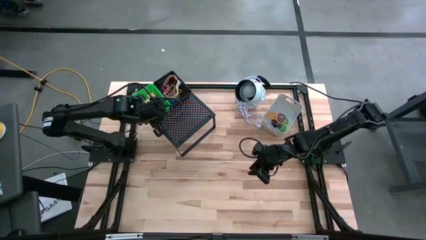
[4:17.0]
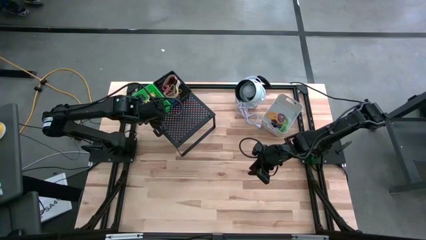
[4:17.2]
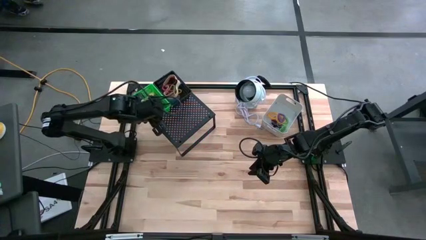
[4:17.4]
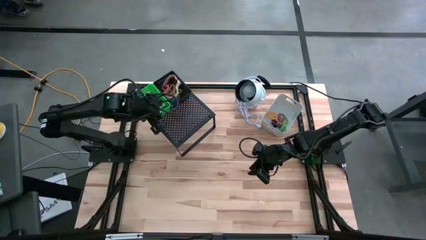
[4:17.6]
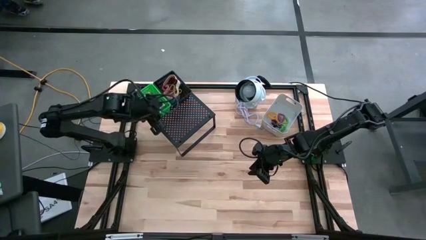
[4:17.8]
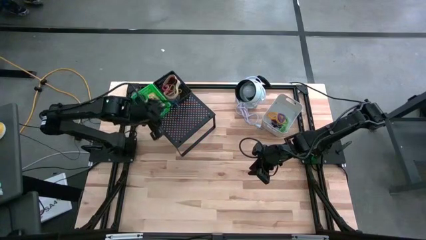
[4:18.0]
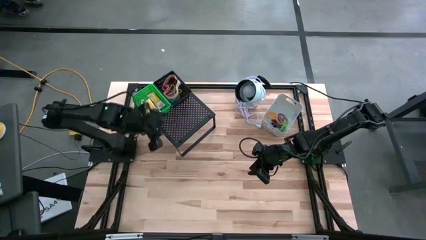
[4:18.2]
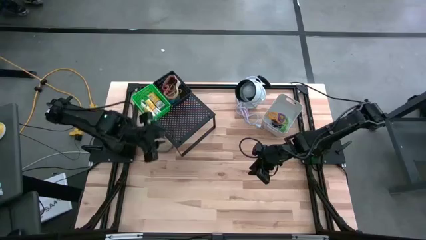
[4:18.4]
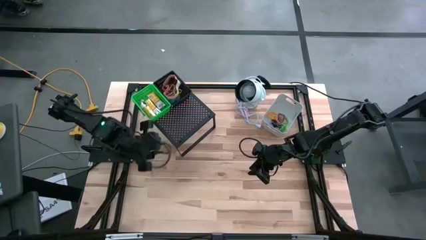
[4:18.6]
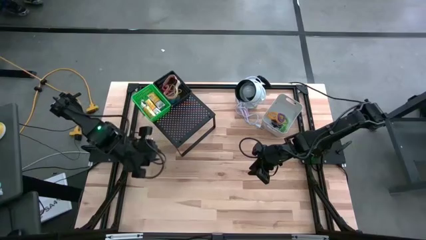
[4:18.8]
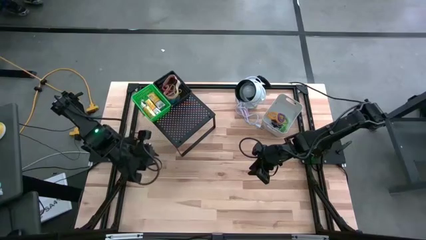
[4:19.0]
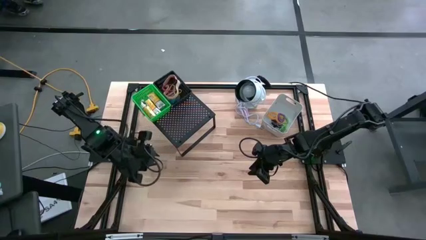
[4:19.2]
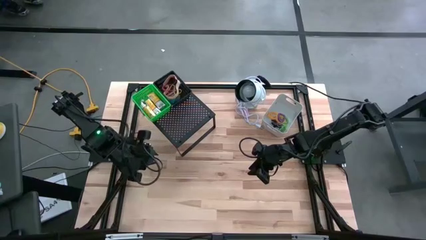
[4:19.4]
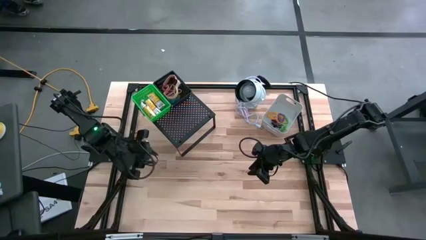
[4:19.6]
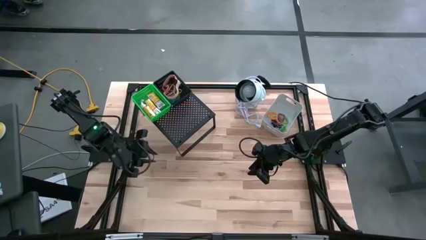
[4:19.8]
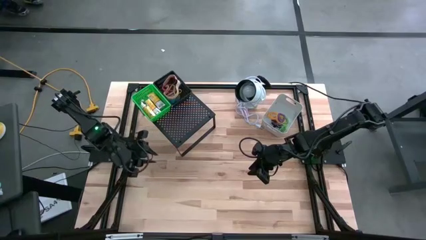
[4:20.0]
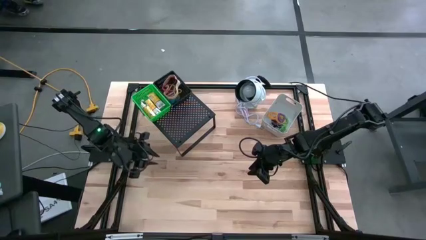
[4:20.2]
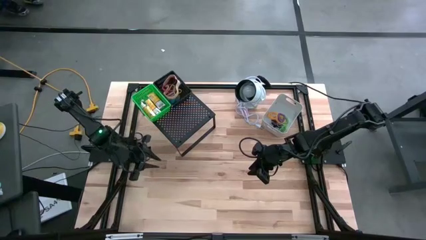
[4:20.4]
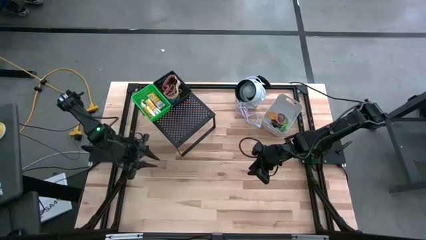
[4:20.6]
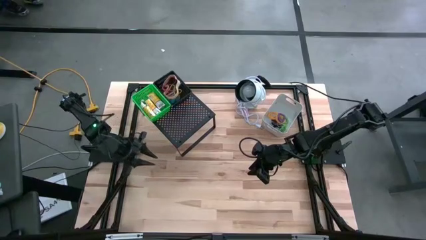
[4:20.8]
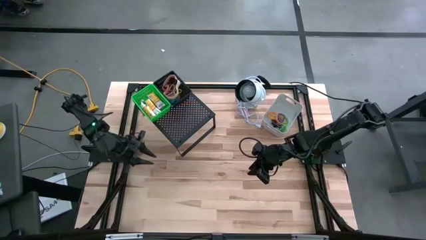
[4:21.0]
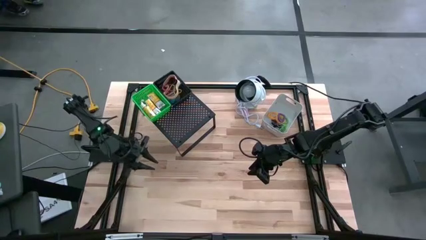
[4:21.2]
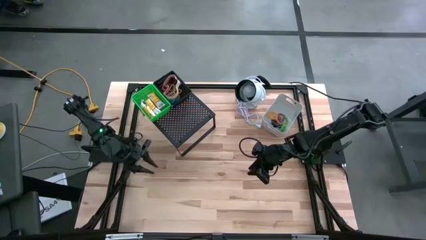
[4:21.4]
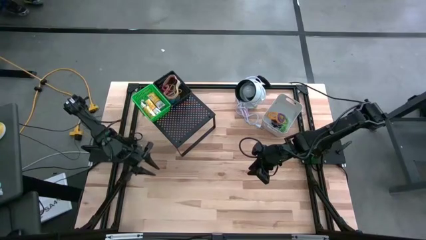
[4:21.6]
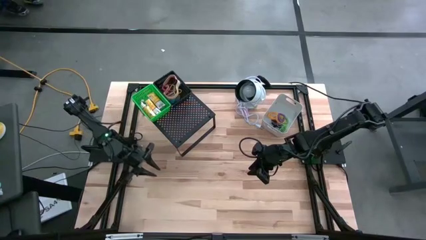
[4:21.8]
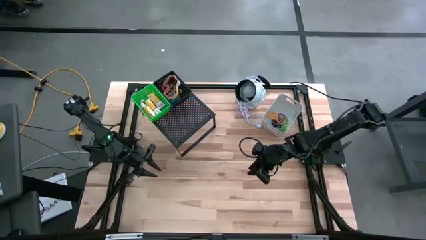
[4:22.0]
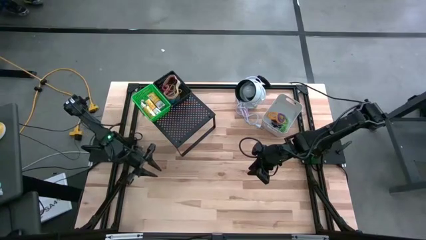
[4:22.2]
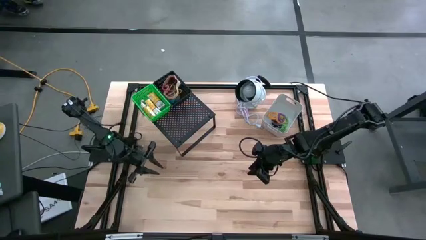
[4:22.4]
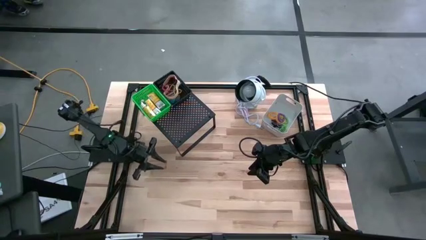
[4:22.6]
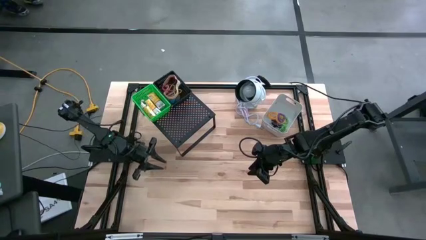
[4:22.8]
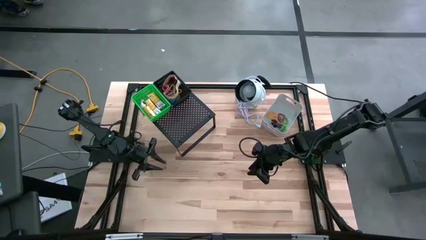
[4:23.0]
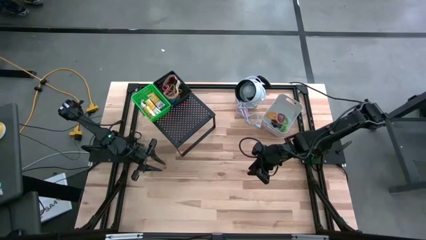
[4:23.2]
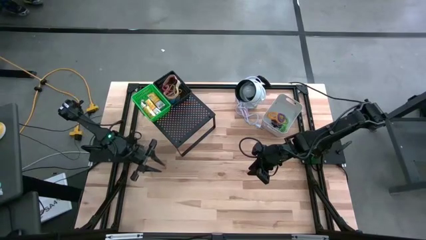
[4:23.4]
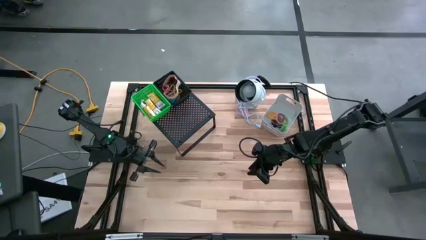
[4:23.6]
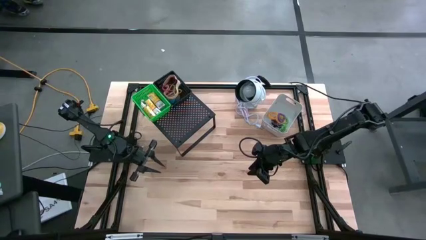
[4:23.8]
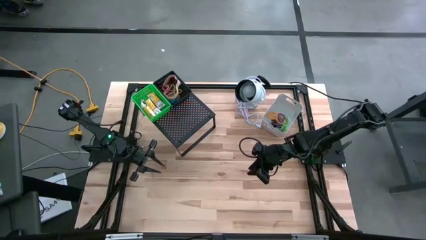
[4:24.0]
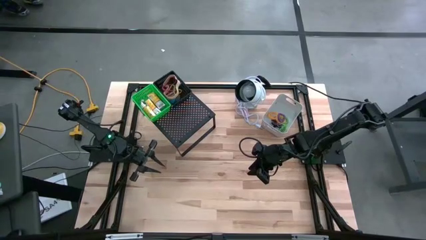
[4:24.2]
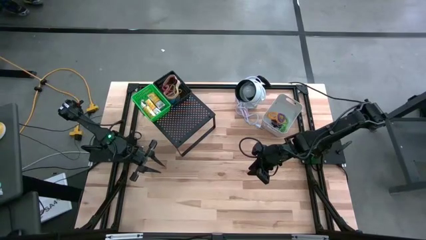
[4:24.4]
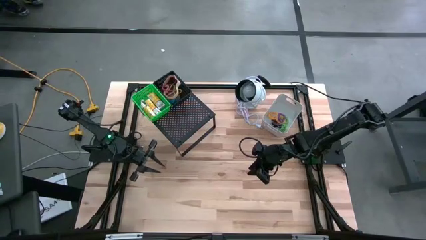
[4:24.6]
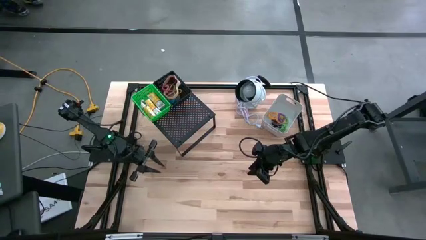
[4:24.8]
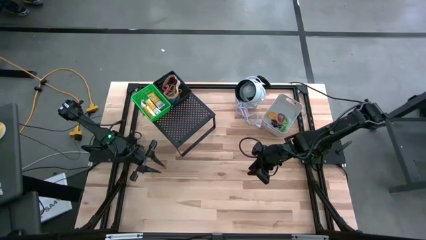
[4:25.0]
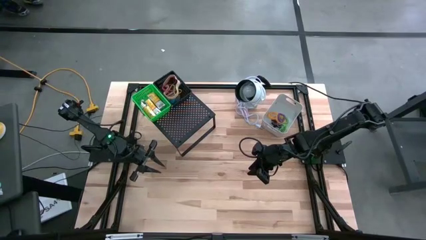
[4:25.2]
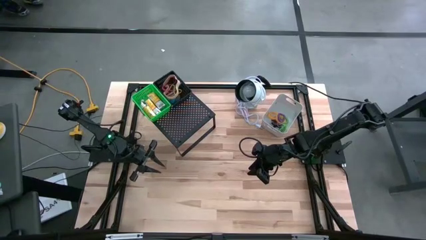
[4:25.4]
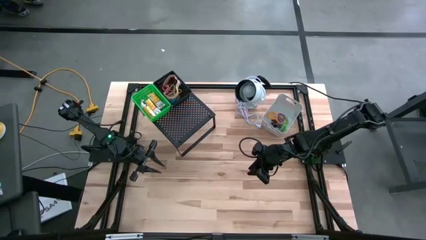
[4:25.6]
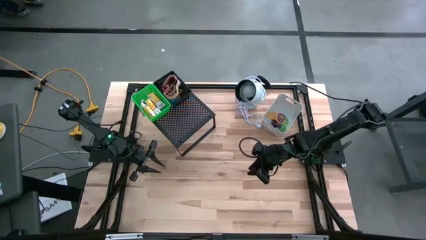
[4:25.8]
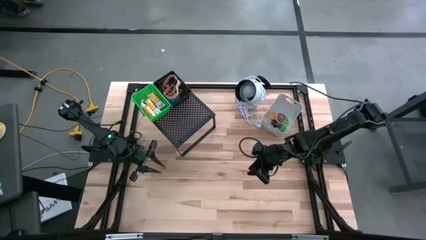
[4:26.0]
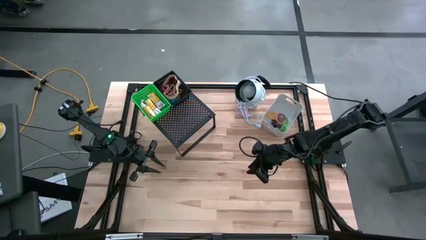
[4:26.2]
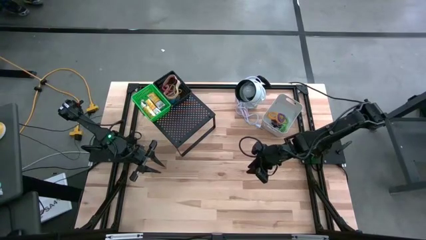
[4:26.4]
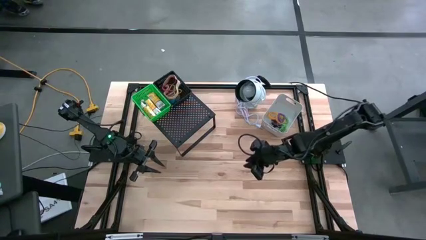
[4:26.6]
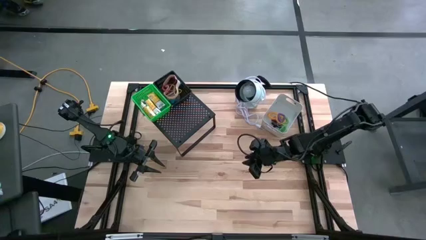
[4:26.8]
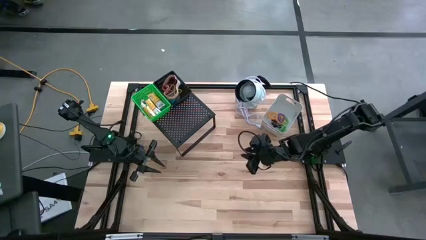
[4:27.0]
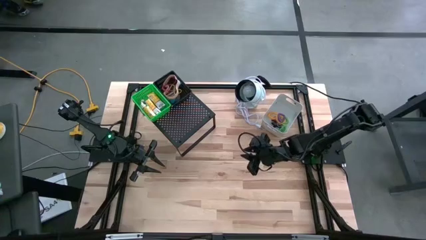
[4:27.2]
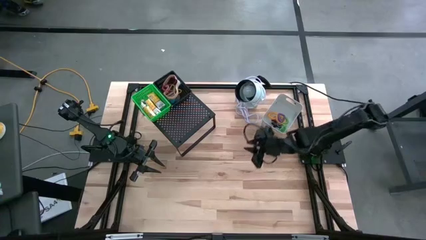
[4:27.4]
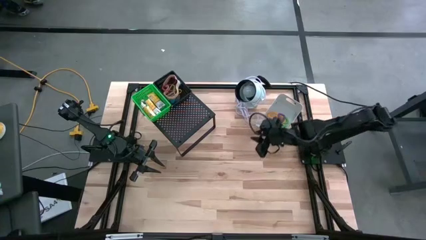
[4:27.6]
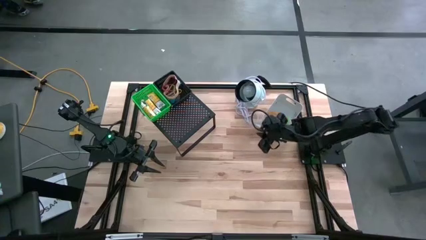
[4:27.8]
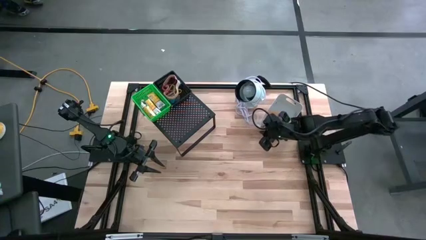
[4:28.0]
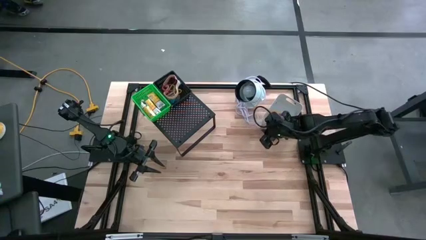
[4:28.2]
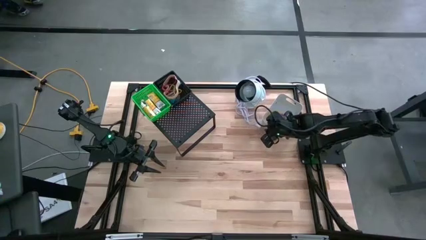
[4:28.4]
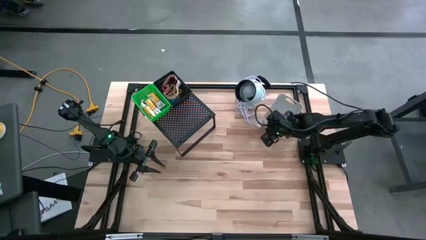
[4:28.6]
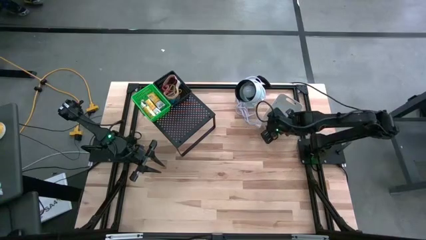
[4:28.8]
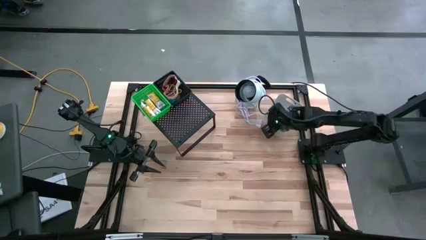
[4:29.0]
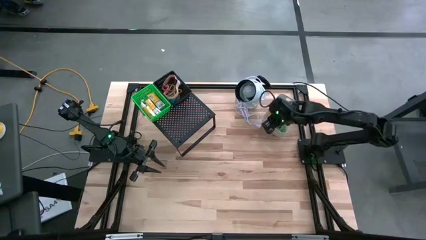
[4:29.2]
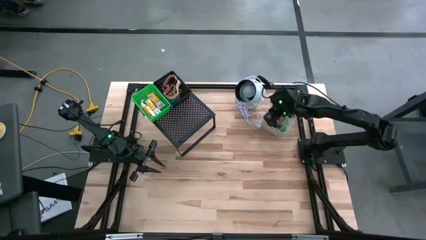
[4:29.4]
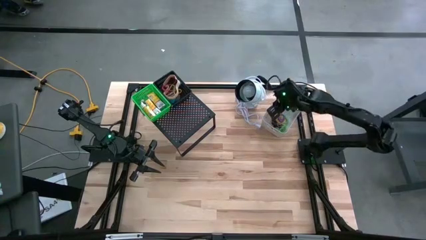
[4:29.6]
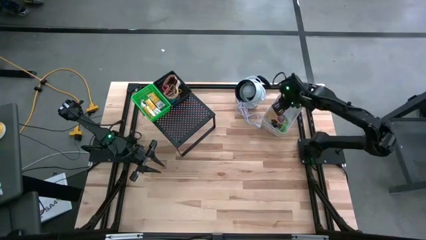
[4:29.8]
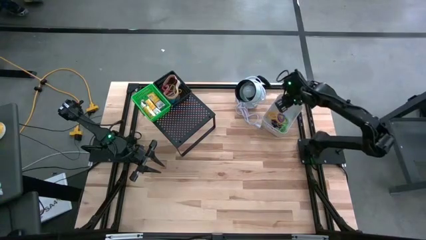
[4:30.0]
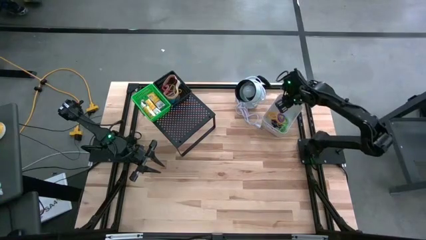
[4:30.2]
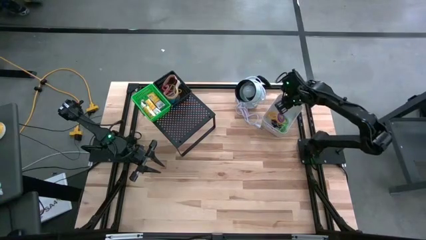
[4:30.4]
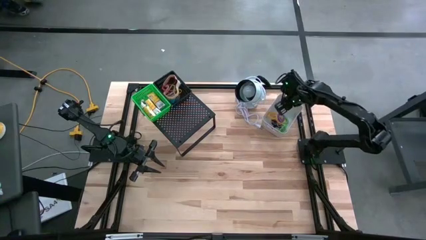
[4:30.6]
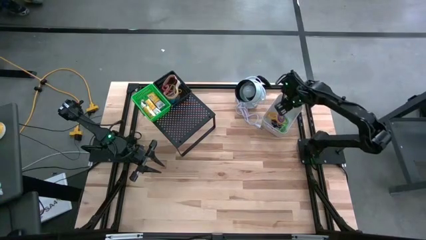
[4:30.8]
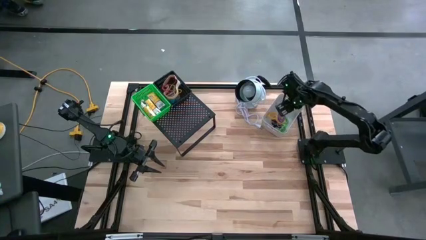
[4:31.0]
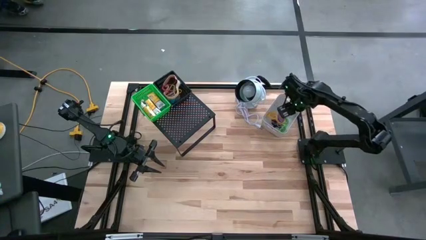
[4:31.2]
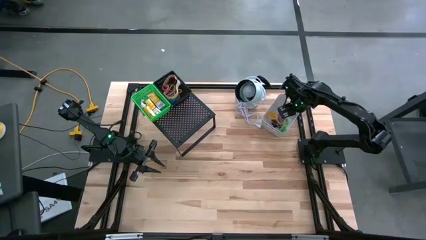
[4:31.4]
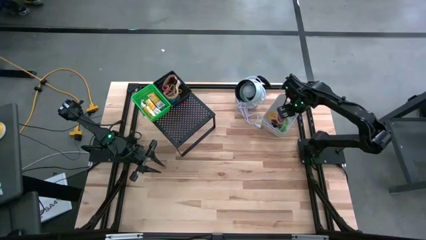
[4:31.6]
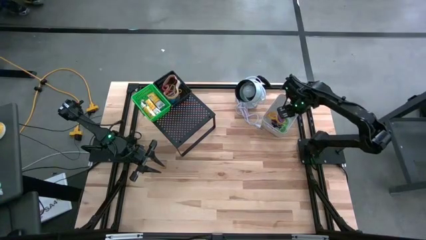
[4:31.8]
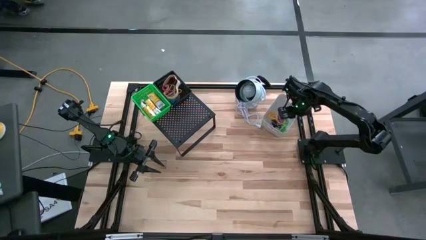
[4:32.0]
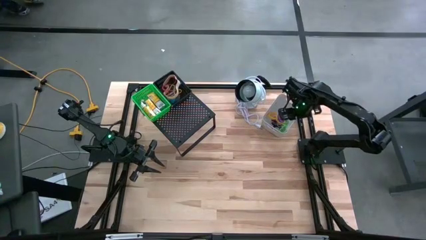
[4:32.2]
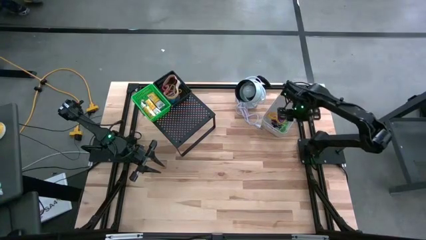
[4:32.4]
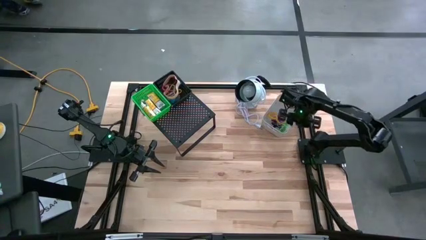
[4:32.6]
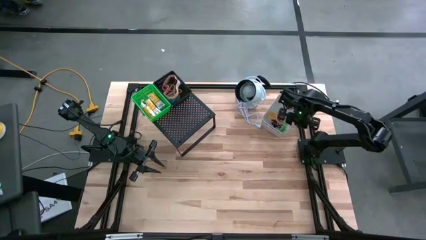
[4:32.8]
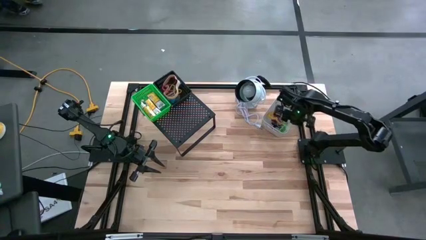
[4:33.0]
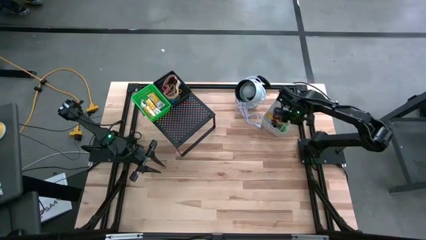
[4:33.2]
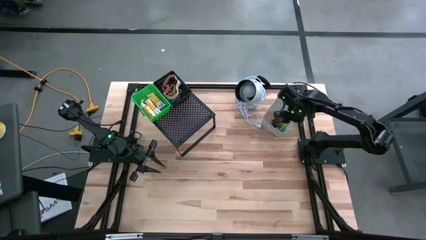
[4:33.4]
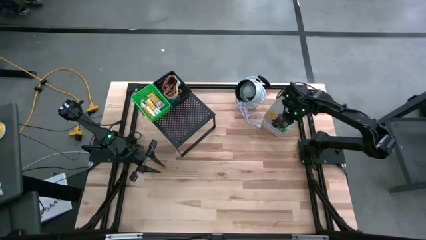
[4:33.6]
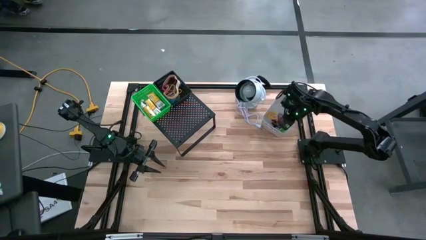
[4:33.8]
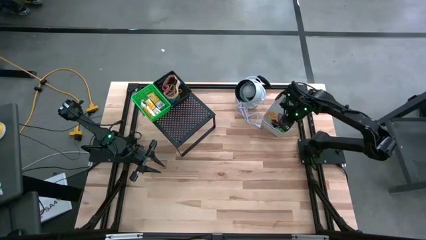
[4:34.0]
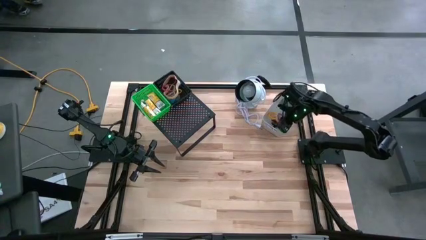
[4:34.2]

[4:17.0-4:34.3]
Task: Pick & Place Office Desk Supplies
Put the white bin on the shelf
